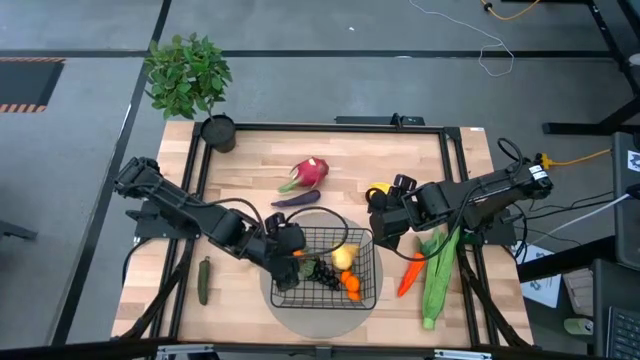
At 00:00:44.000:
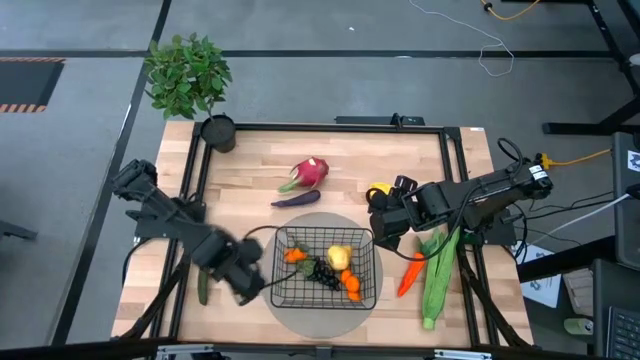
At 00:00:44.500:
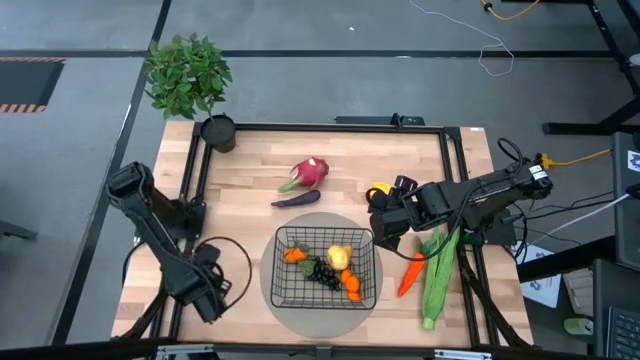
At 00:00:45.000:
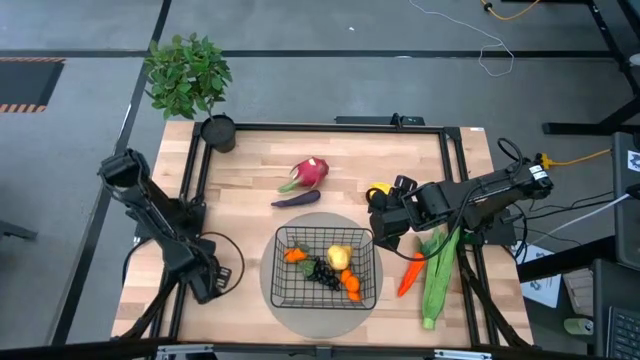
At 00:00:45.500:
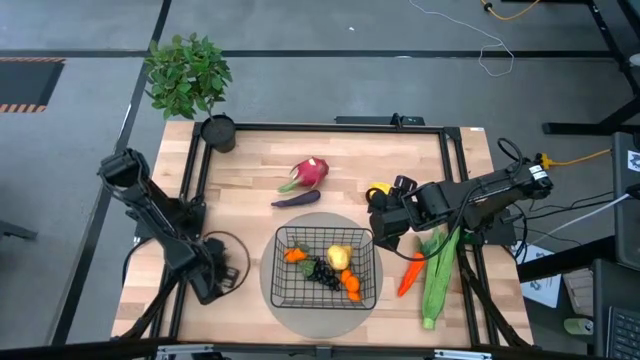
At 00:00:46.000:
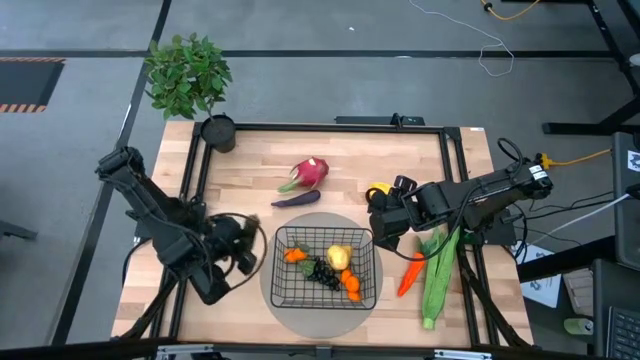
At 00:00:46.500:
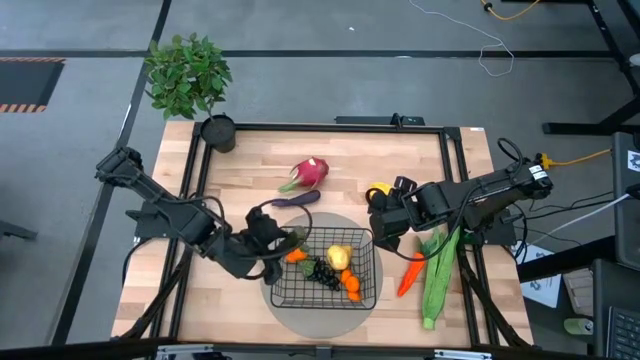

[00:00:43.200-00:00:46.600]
Task: Build produce basket
Put the green chili pepper into the black wire basket

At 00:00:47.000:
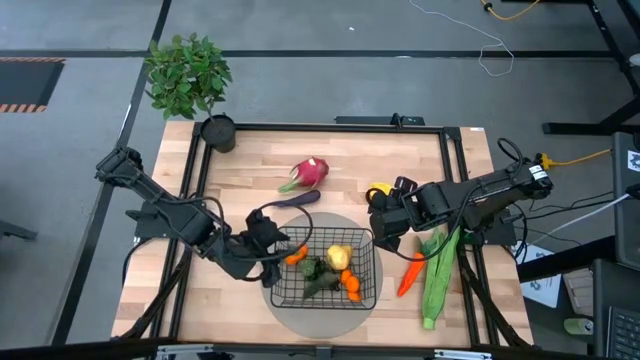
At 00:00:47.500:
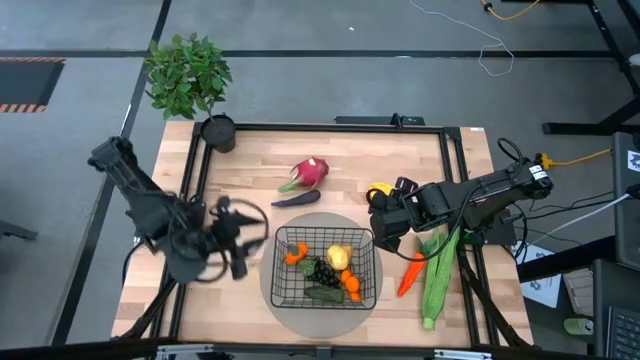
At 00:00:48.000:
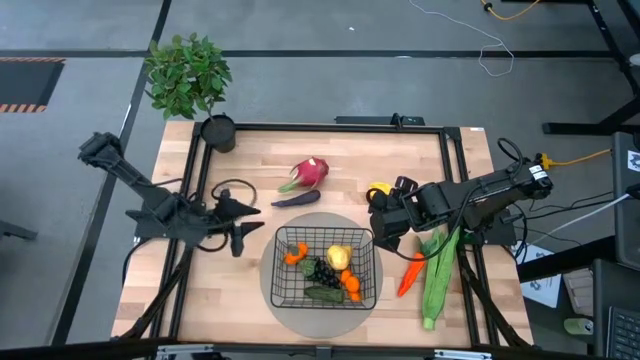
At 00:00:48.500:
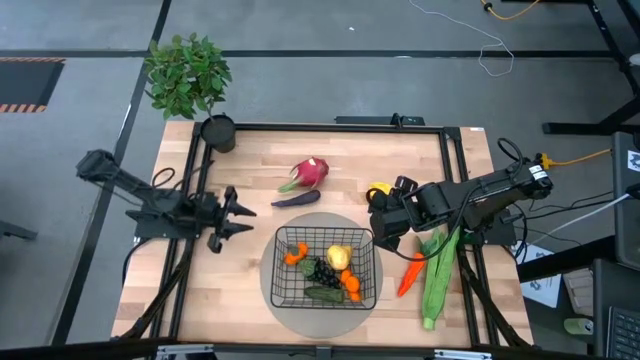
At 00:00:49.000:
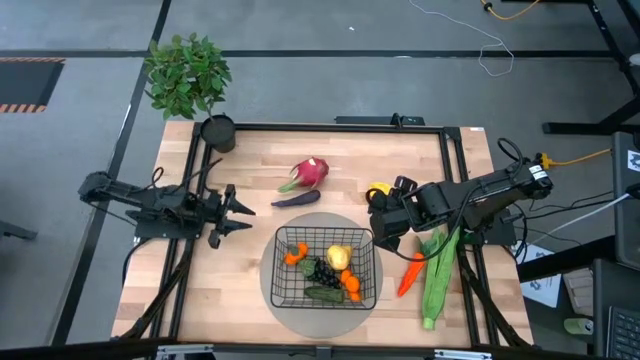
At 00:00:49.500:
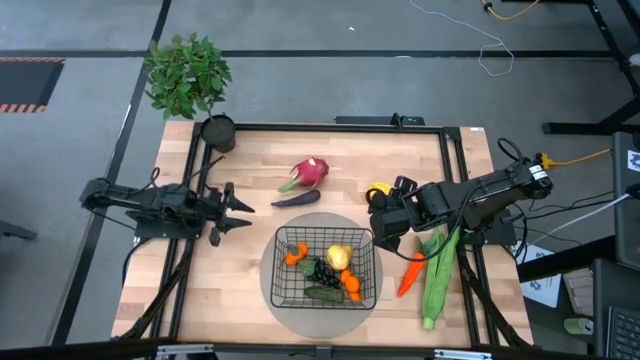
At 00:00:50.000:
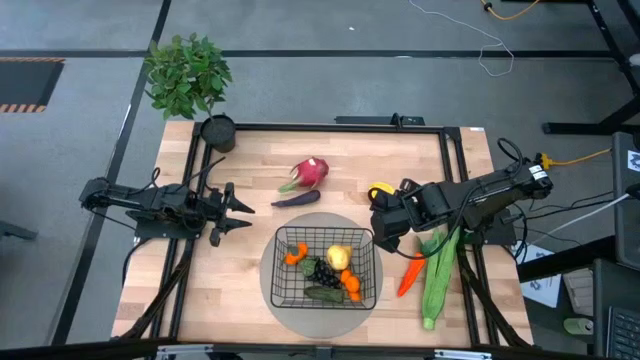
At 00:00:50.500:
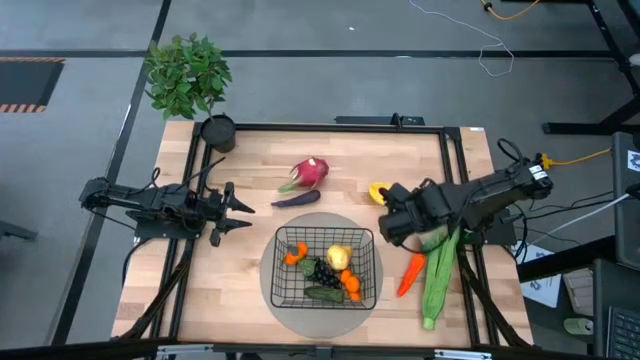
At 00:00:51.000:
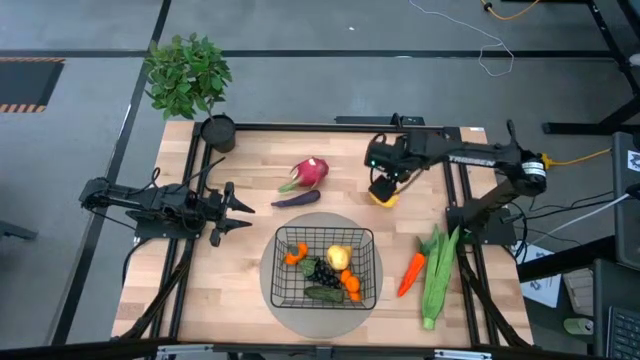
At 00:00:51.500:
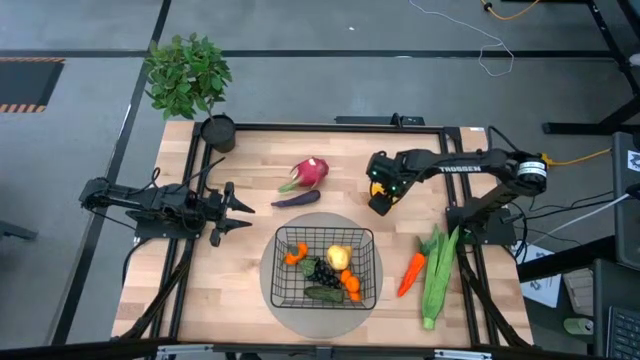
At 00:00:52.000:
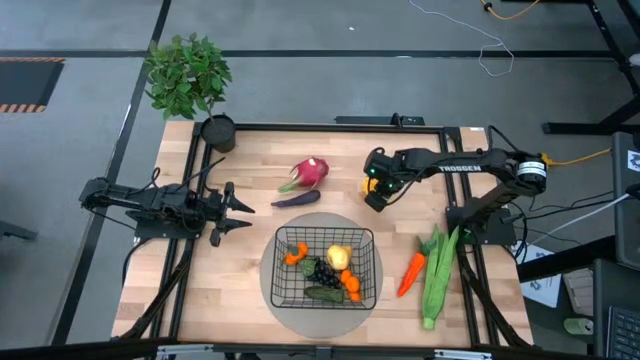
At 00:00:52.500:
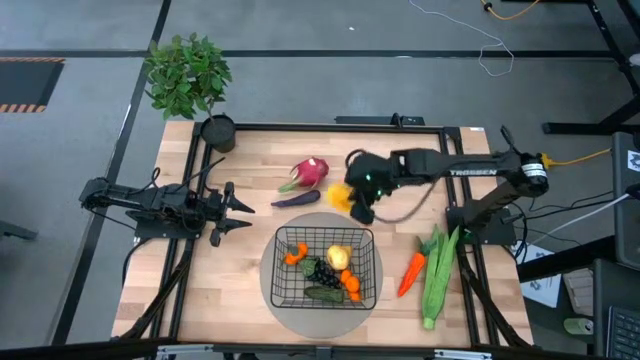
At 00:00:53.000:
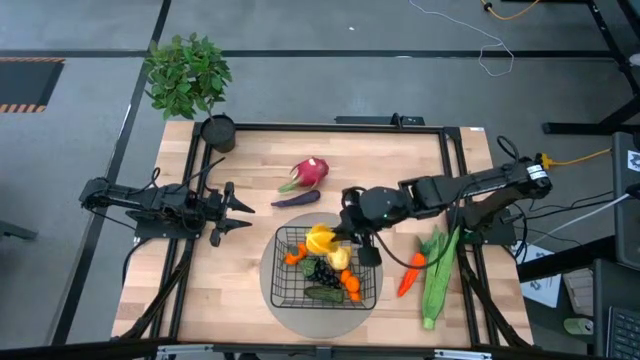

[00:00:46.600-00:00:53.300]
Put the yellow starfruit into the black wire basket

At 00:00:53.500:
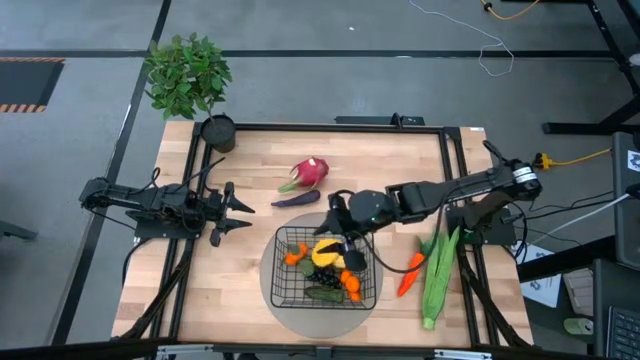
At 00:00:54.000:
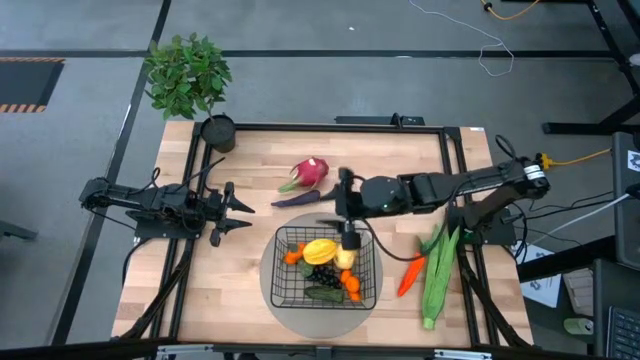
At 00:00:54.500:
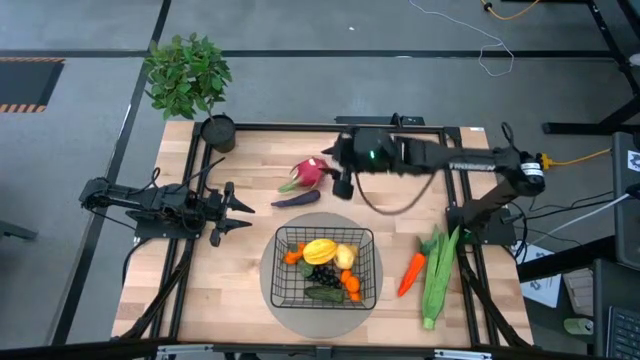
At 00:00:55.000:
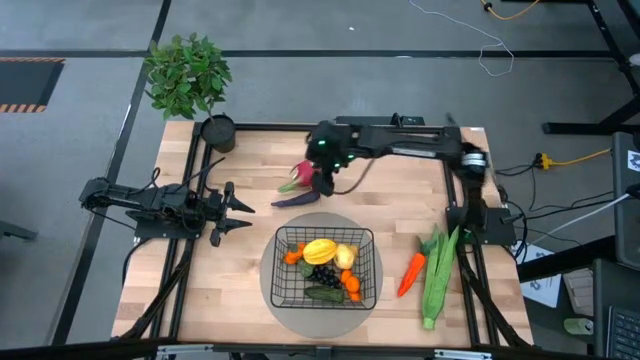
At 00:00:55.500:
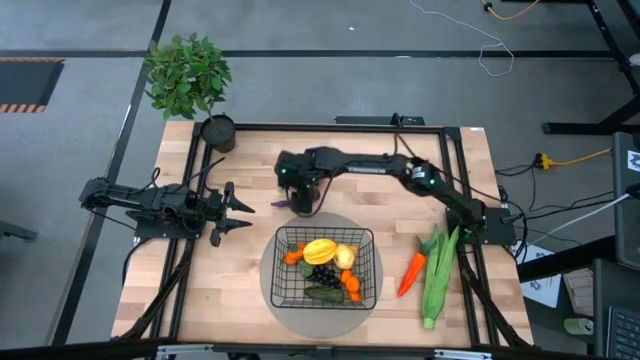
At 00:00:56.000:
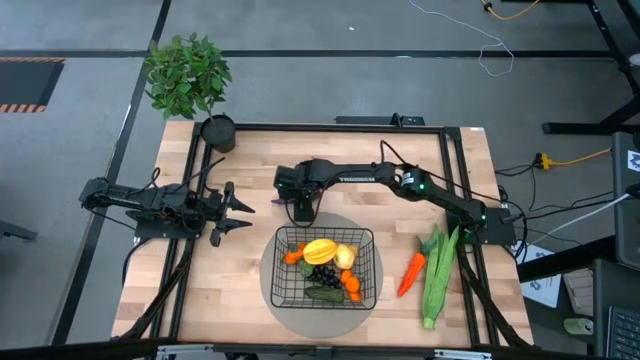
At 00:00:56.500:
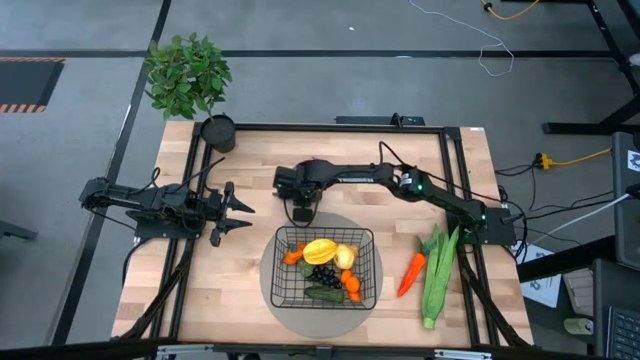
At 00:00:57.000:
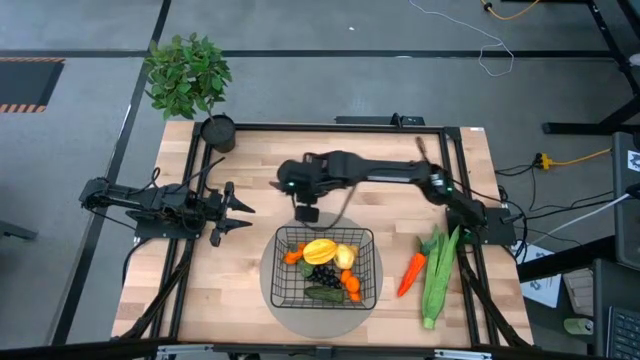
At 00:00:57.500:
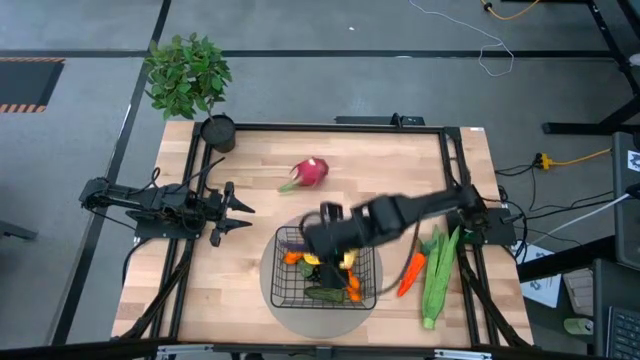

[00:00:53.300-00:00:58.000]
Put the violet eggplant into the black wire basket

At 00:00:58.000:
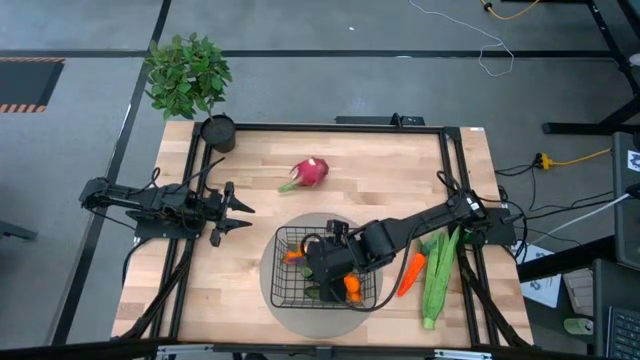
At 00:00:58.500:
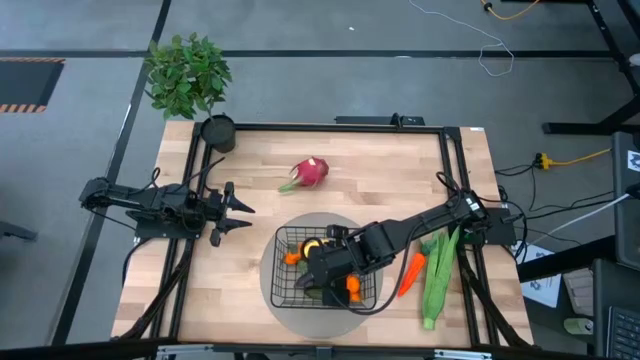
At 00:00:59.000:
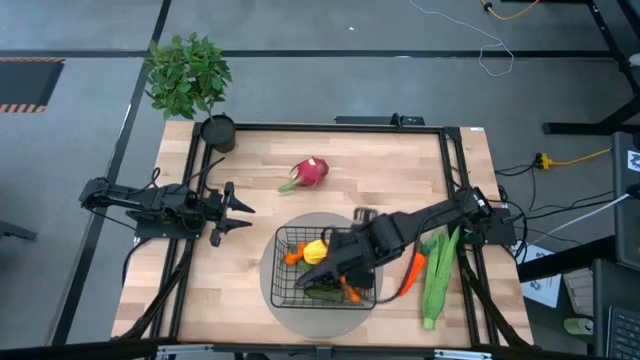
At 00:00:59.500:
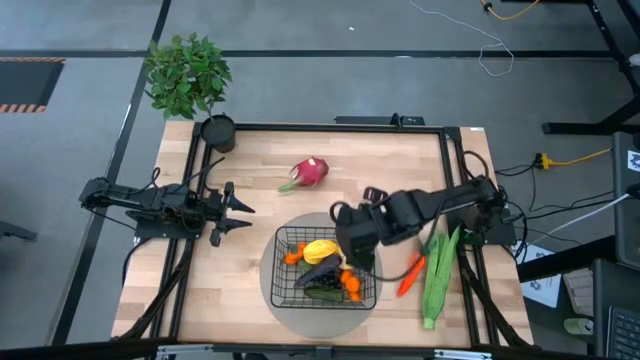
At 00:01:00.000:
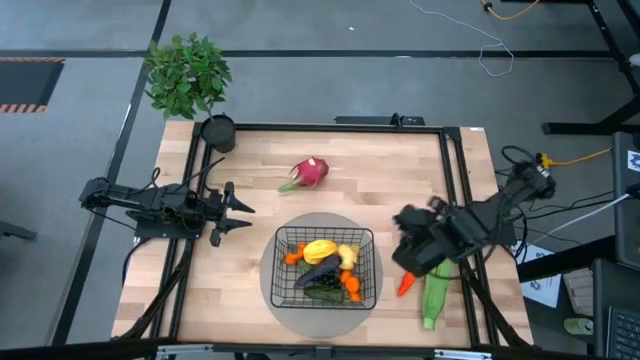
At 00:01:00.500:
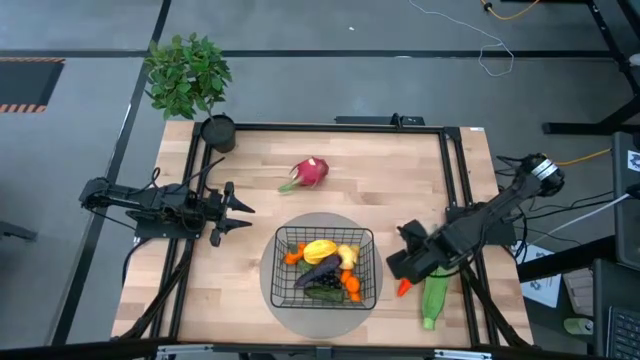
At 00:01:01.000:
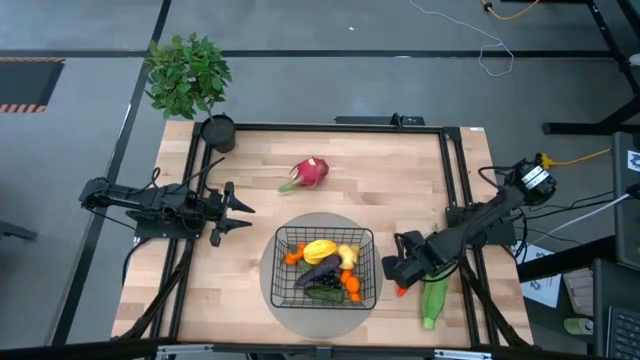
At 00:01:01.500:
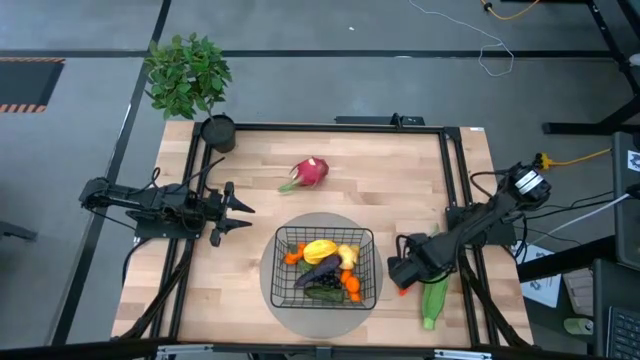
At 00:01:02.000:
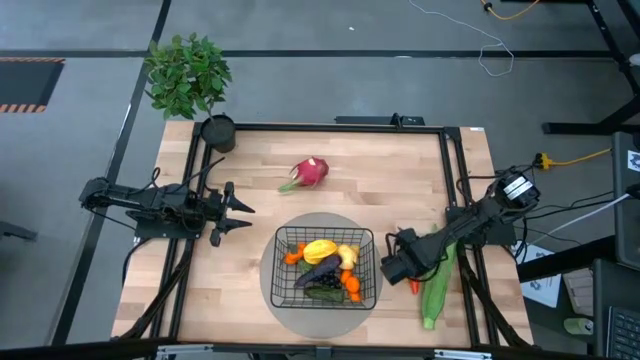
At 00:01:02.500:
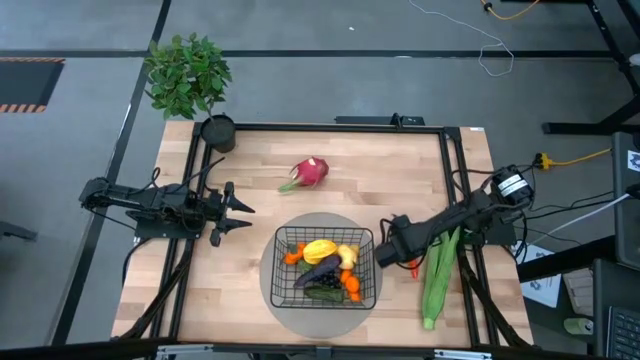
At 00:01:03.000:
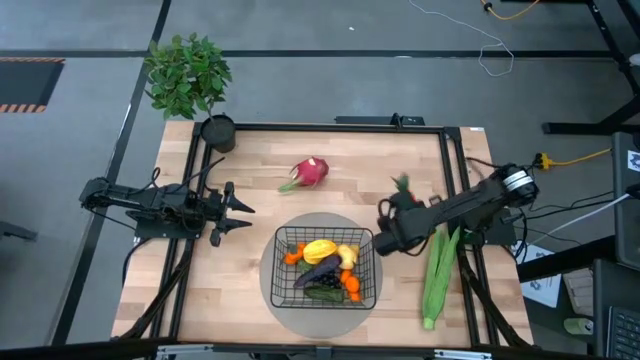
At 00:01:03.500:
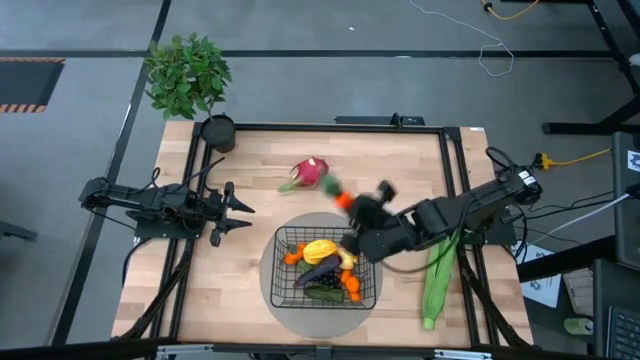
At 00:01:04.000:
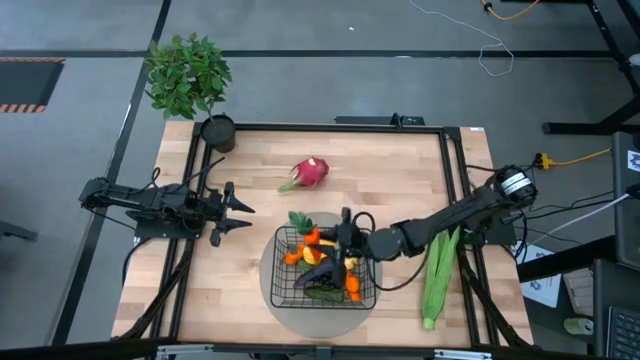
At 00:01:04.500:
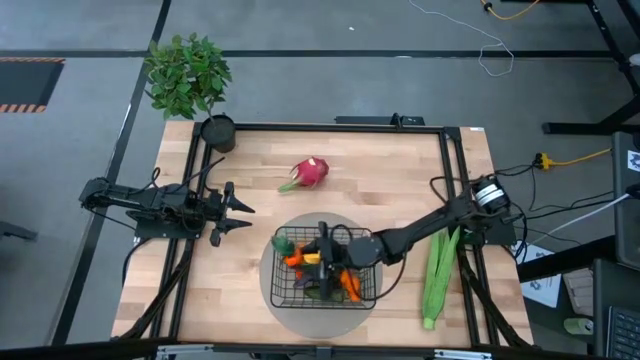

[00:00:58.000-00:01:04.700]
Put the orange carrot into the black wire basket
